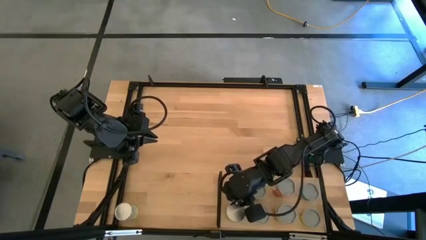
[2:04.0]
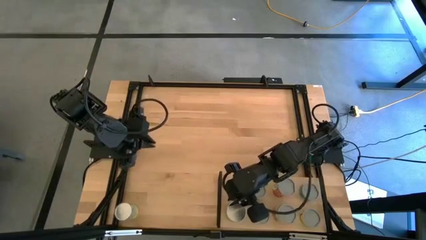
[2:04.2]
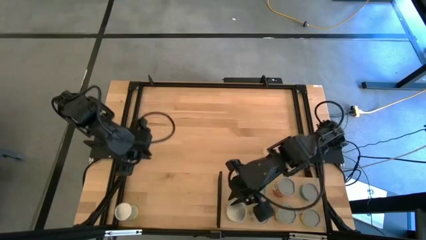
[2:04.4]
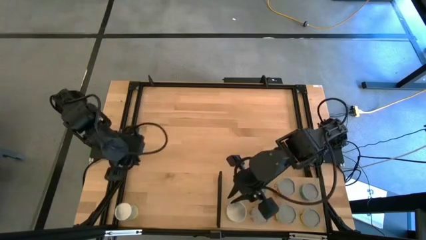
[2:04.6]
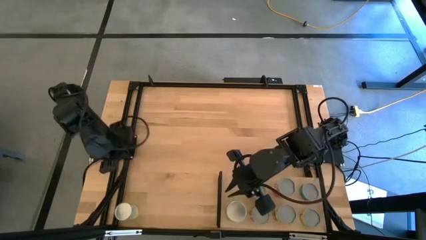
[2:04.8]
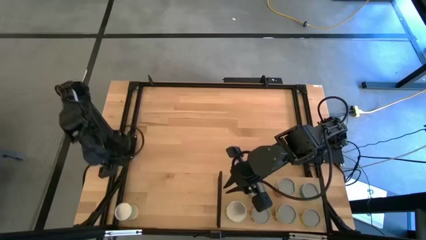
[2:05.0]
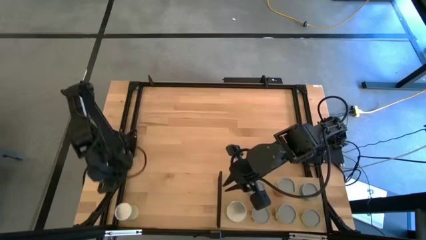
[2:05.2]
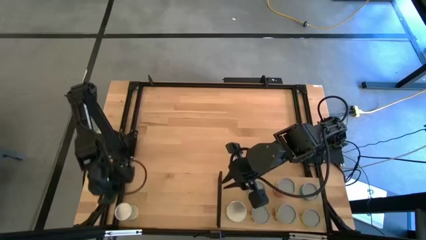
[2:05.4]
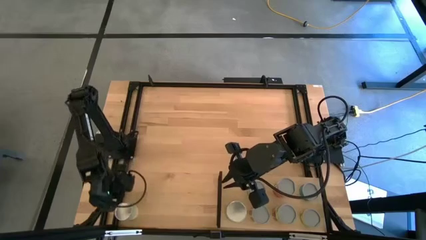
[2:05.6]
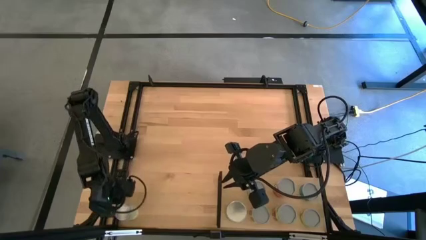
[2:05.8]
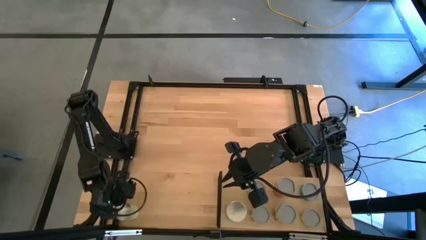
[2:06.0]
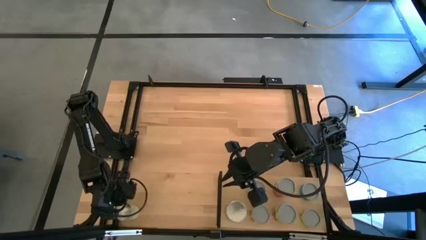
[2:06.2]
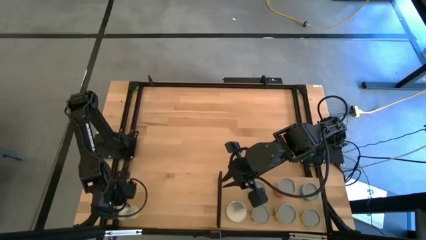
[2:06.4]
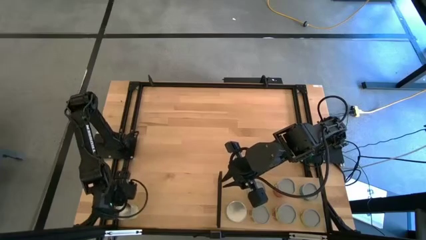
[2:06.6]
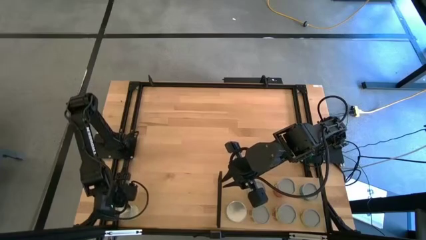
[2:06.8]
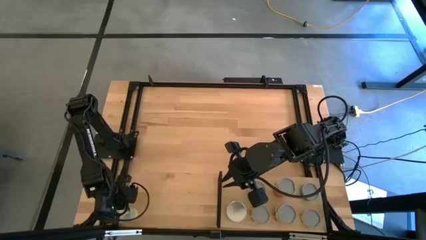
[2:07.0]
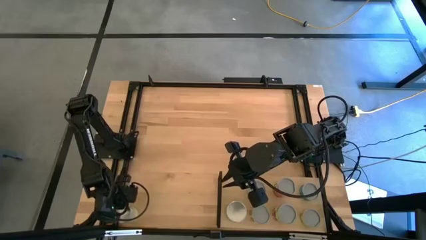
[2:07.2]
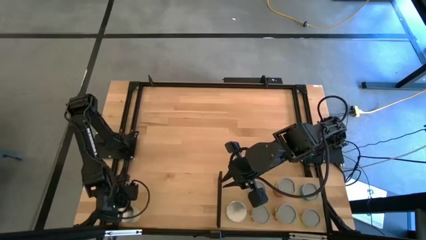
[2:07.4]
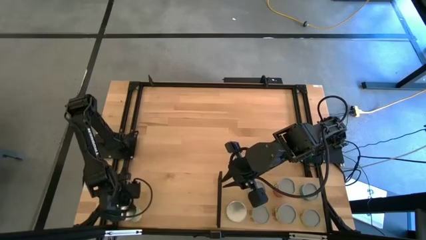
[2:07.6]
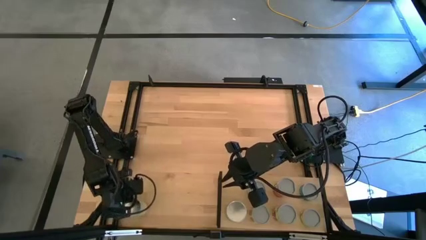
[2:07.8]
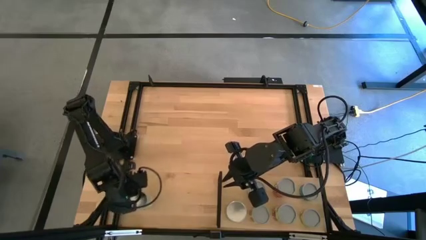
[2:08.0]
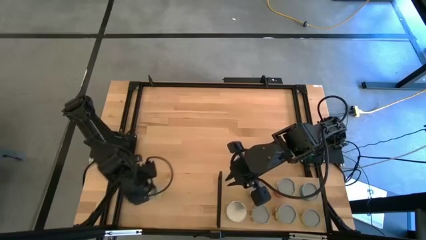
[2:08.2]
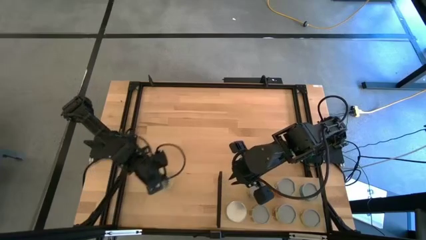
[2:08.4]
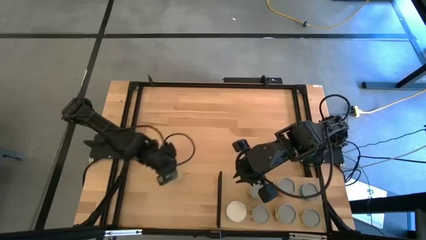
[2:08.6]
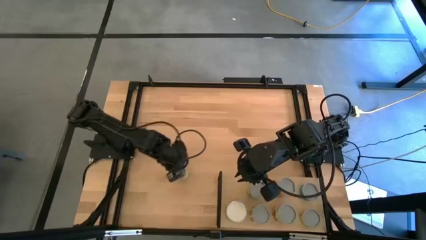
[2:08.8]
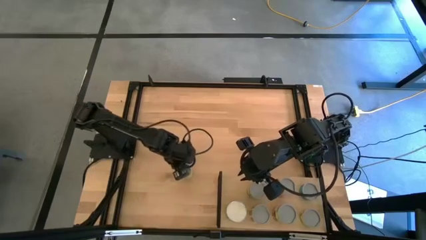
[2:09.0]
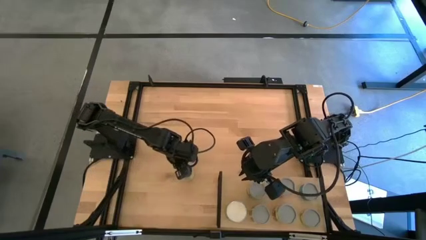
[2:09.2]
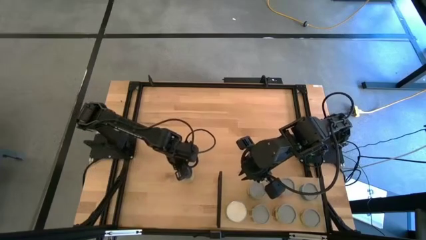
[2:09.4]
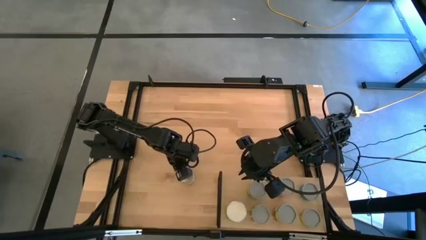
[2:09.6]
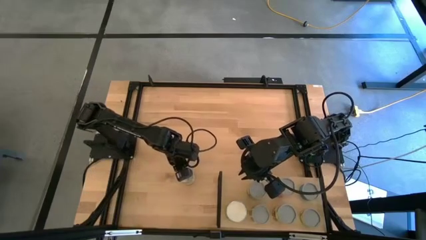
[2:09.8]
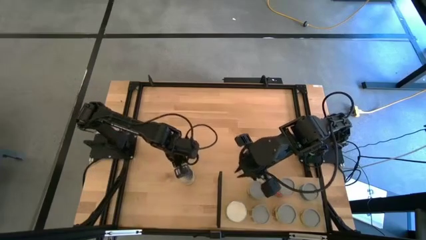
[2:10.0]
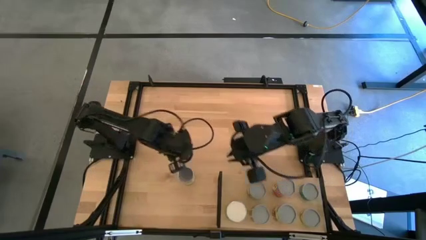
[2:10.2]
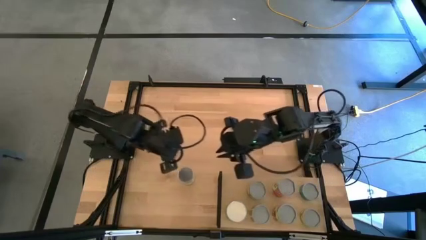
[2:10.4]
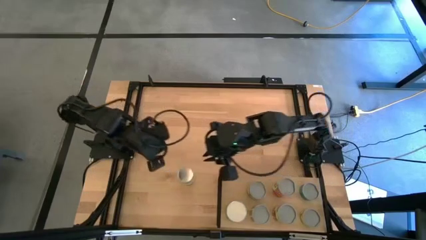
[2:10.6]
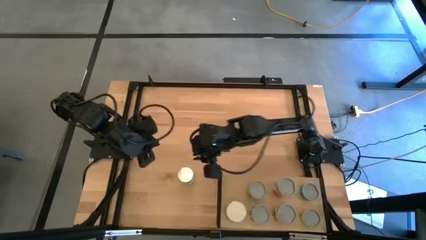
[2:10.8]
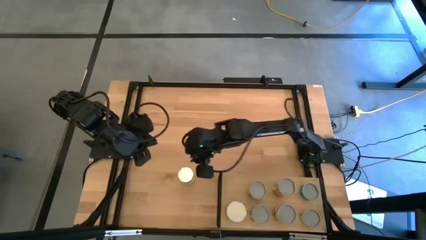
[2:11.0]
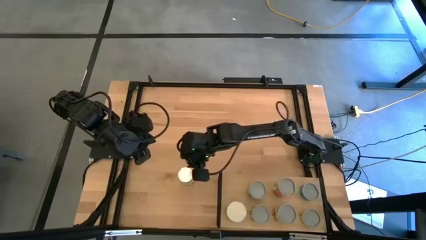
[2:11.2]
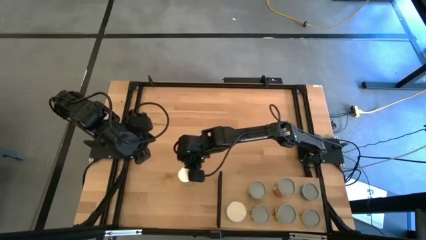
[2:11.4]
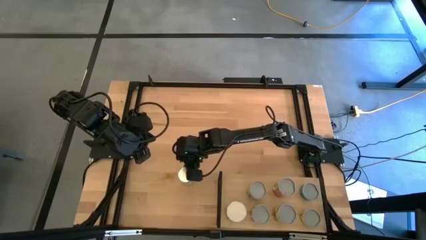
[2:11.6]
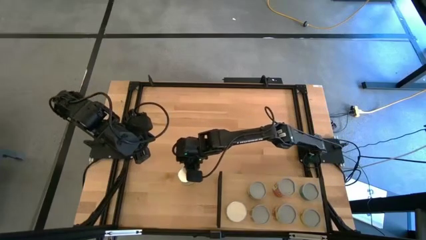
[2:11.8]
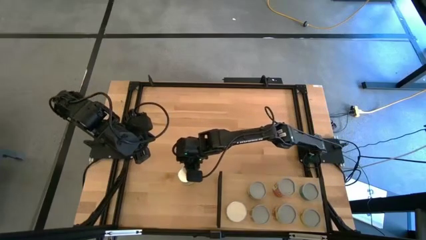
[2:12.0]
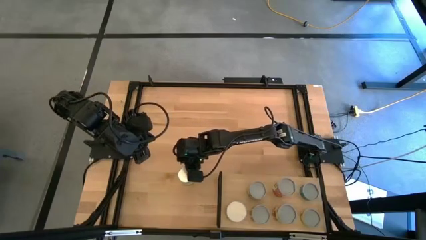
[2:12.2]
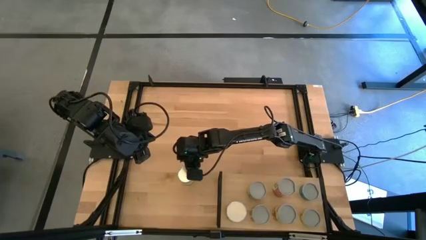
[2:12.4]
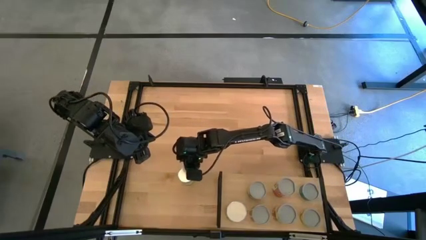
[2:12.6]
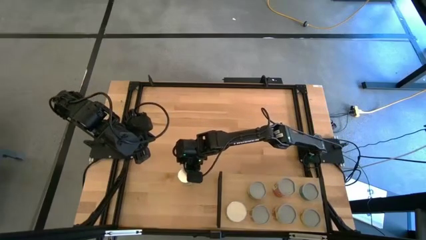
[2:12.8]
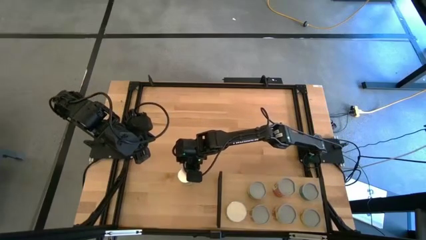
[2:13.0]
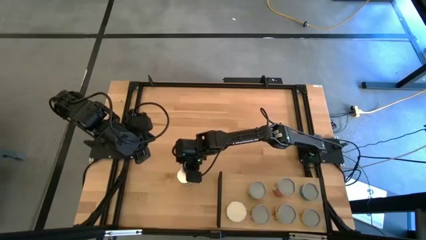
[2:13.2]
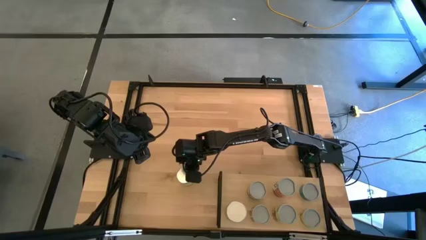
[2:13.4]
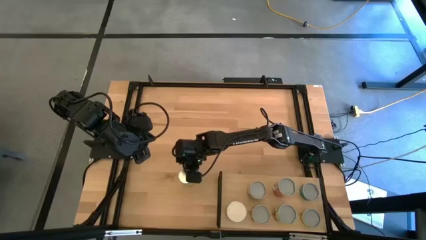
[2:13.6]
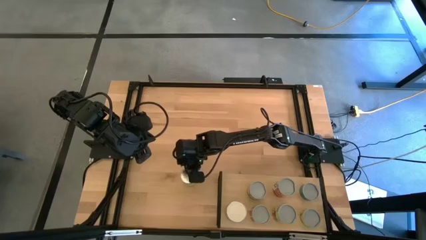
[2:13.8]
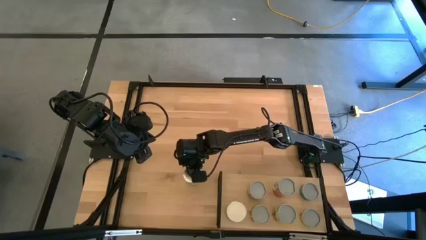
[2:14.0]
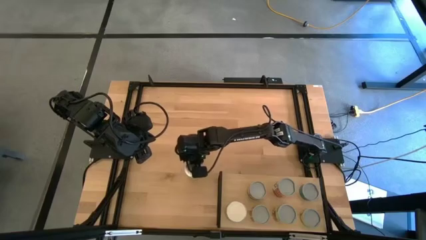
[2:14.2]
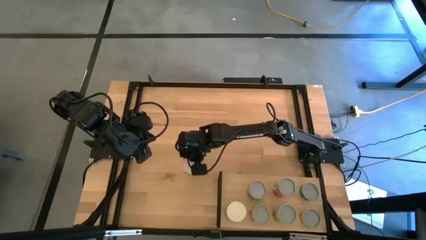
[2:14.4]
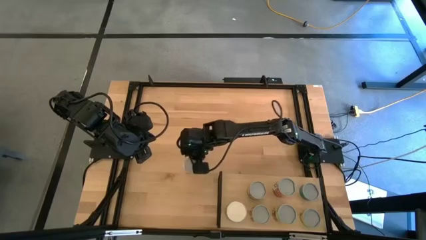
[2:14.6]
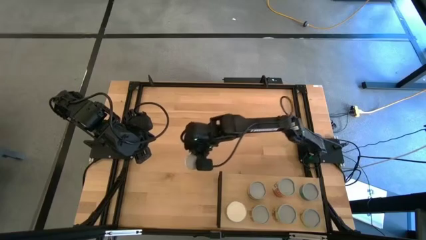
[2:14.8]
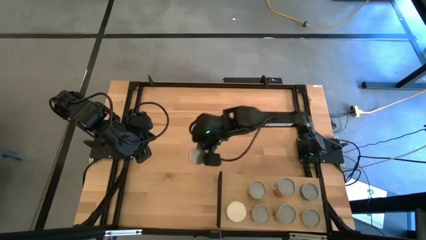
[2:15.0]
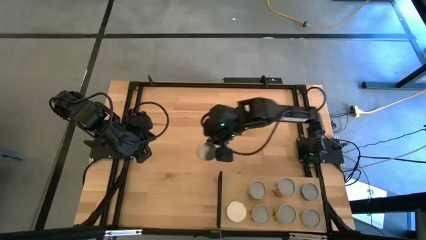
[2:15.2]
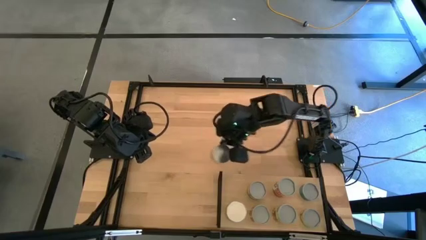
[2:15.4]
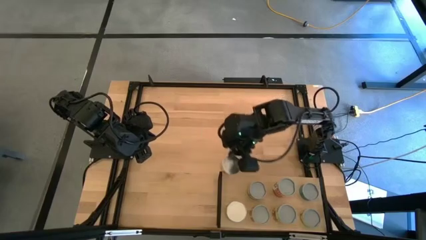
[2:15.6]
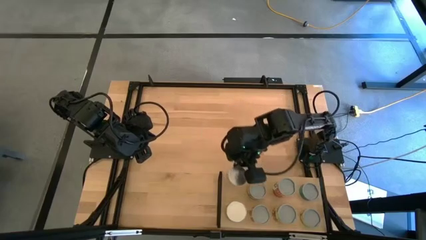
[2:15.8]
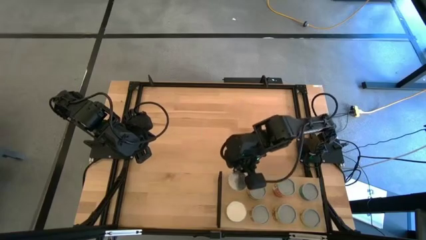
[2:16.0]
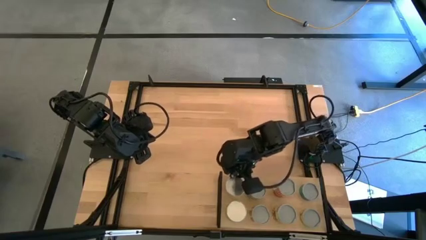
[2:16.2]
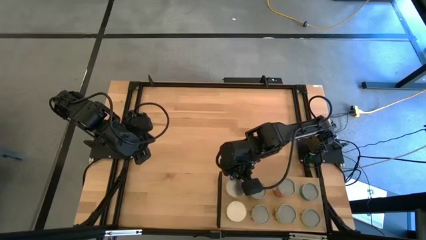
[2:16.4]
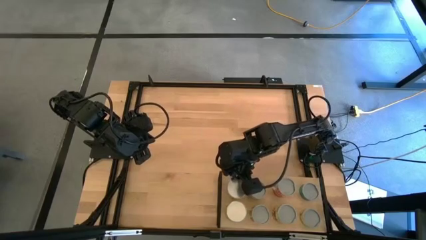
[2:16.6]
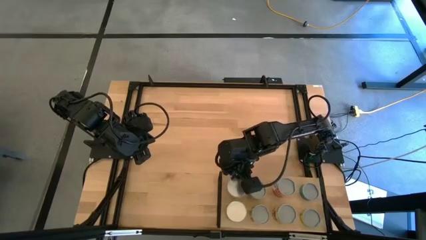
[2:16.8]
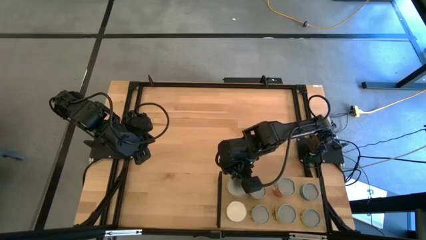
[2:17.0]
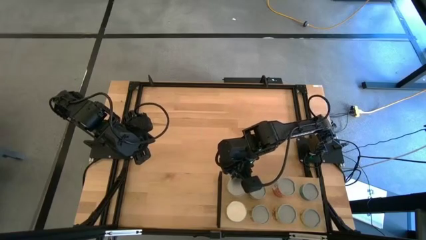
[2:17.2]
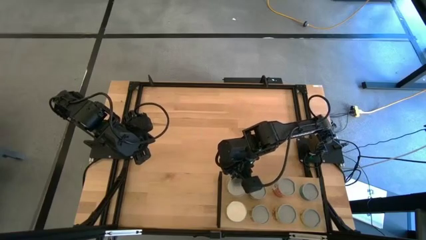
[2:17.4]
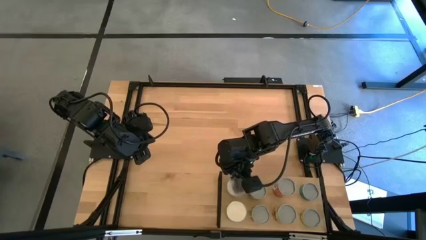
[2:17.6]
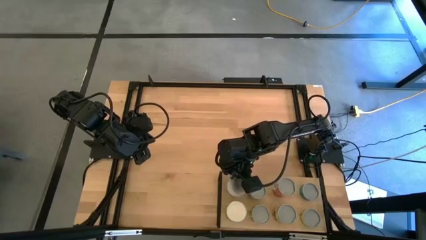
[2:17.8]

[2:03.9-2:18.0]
Task: Pick and place cans onto a shelf
Put the canned carrots on the shelf
